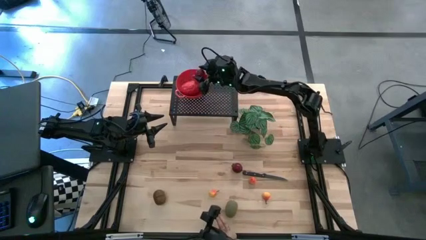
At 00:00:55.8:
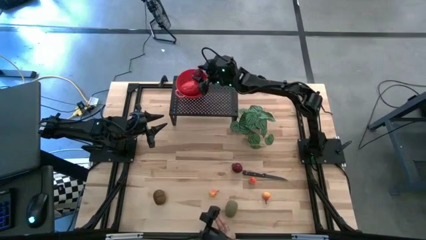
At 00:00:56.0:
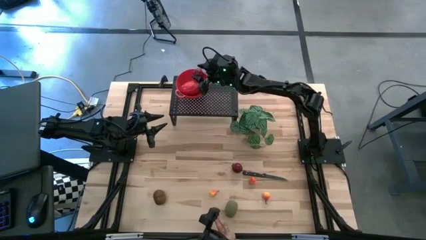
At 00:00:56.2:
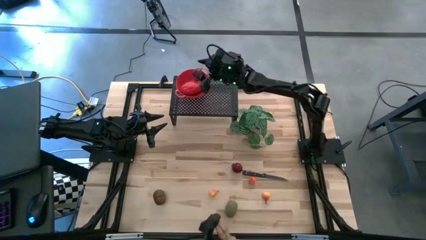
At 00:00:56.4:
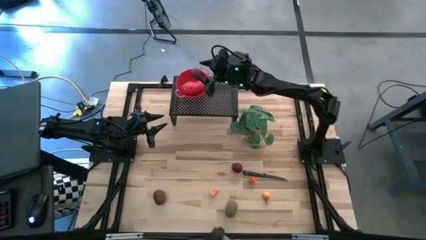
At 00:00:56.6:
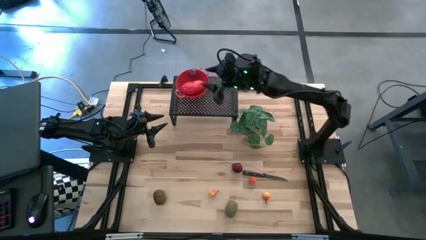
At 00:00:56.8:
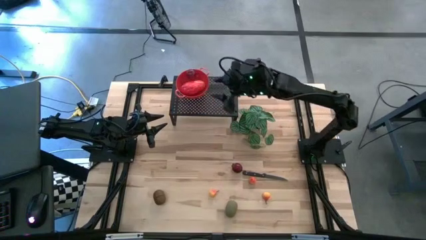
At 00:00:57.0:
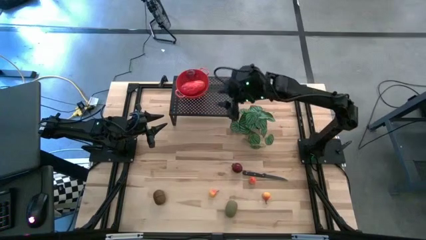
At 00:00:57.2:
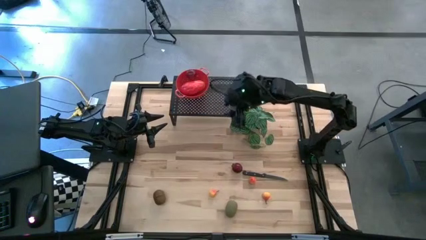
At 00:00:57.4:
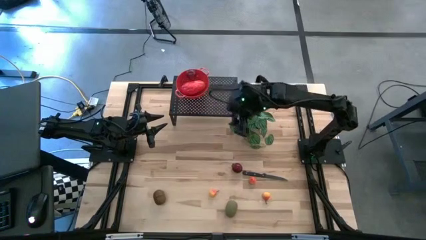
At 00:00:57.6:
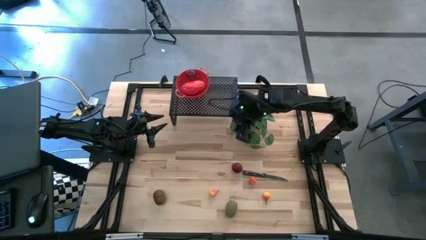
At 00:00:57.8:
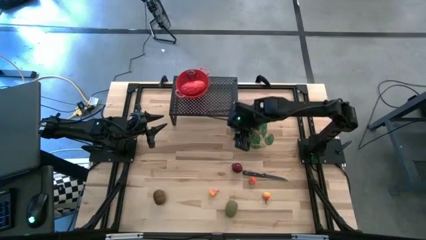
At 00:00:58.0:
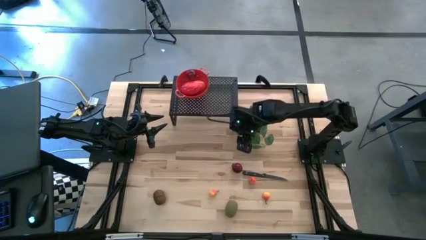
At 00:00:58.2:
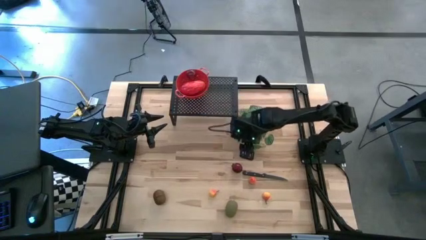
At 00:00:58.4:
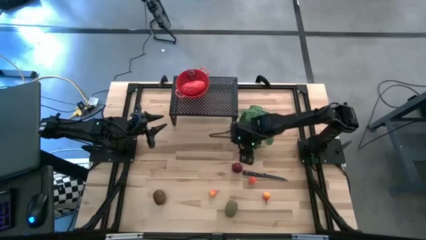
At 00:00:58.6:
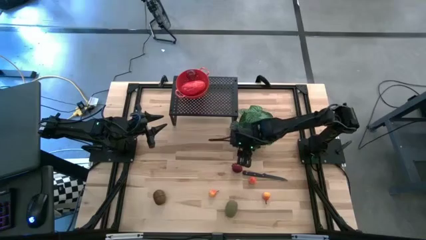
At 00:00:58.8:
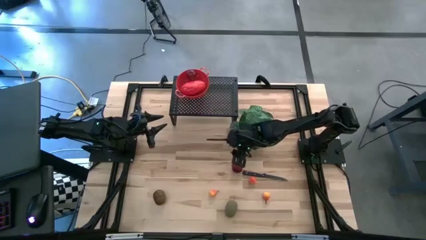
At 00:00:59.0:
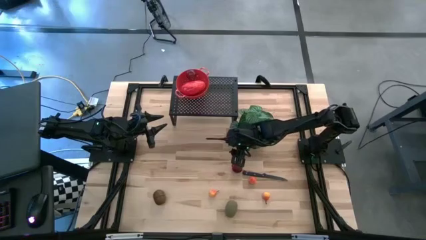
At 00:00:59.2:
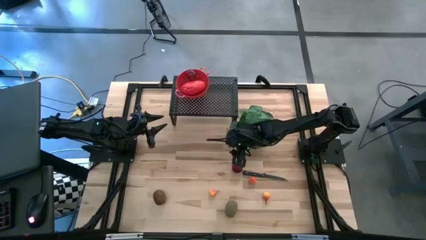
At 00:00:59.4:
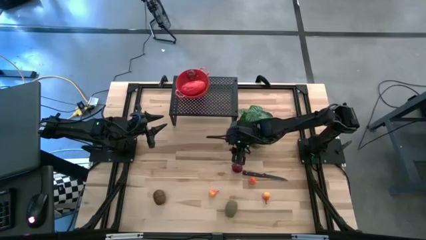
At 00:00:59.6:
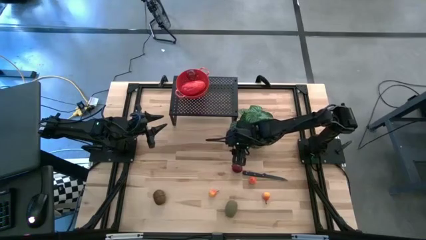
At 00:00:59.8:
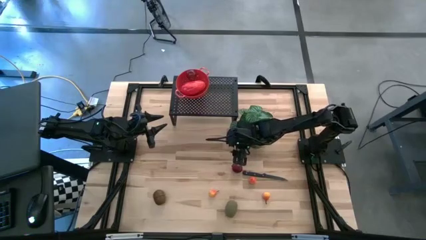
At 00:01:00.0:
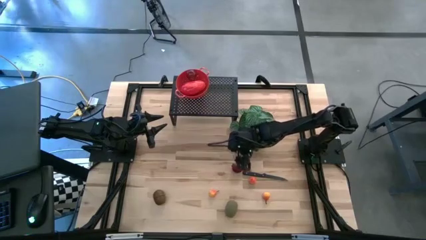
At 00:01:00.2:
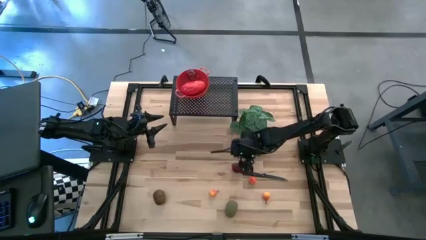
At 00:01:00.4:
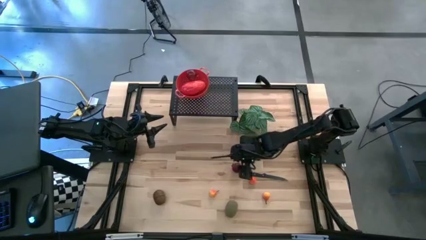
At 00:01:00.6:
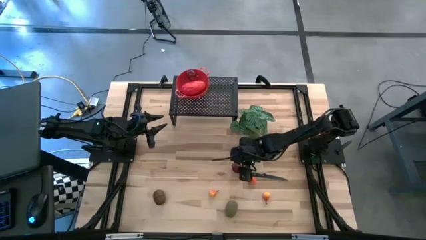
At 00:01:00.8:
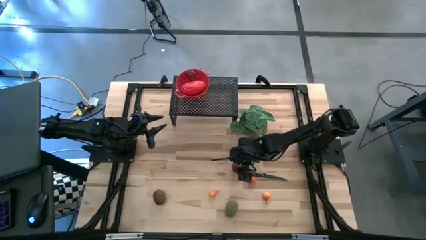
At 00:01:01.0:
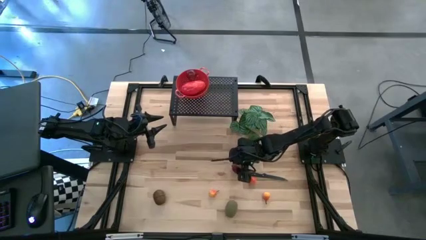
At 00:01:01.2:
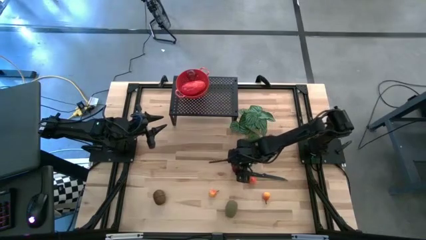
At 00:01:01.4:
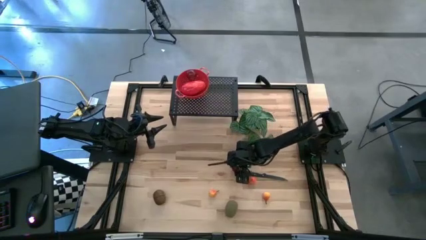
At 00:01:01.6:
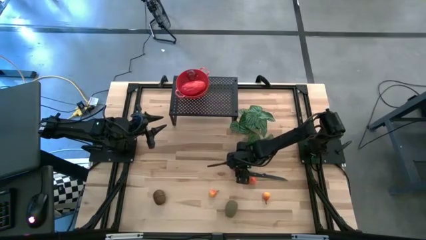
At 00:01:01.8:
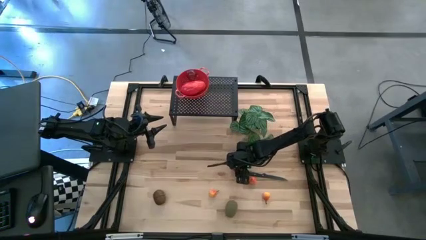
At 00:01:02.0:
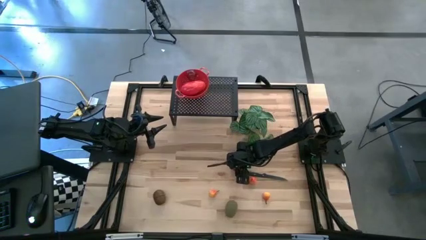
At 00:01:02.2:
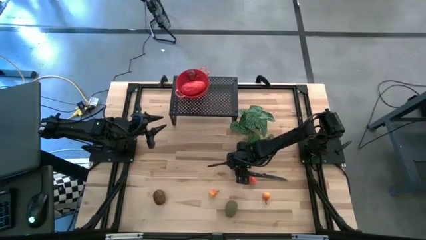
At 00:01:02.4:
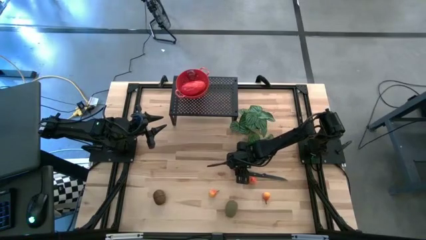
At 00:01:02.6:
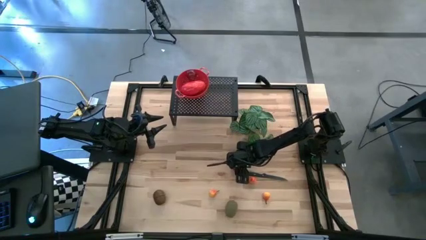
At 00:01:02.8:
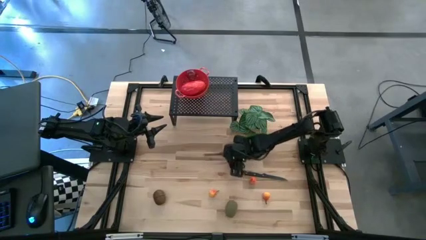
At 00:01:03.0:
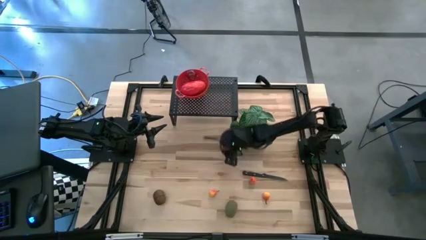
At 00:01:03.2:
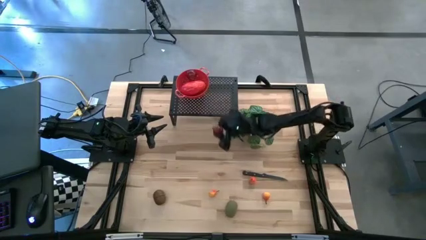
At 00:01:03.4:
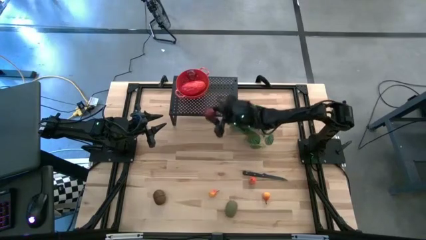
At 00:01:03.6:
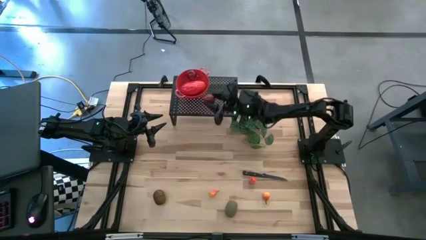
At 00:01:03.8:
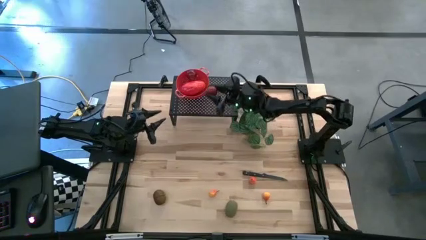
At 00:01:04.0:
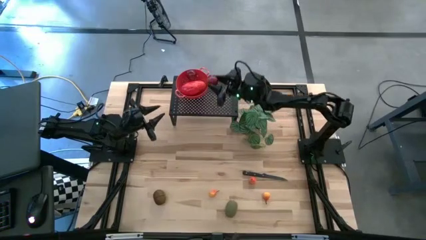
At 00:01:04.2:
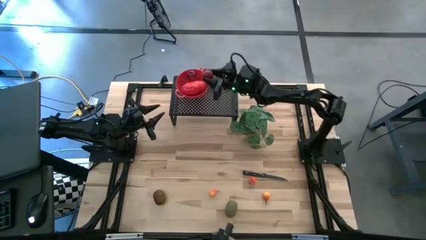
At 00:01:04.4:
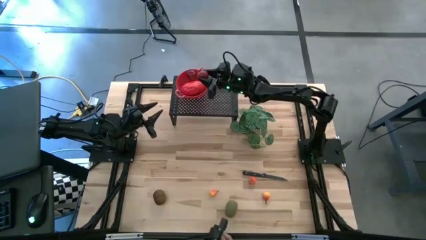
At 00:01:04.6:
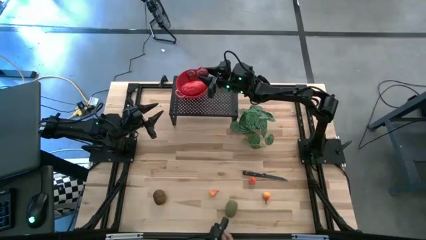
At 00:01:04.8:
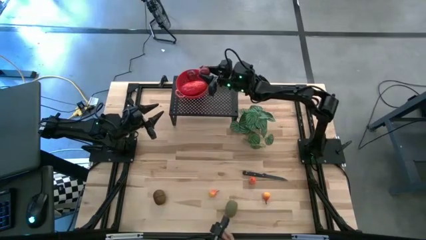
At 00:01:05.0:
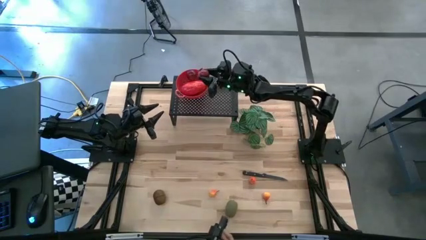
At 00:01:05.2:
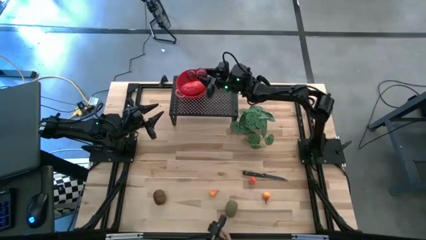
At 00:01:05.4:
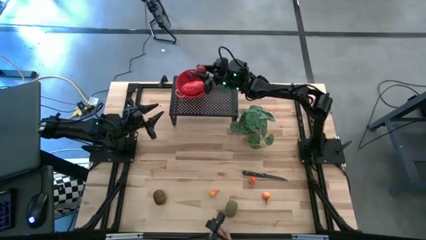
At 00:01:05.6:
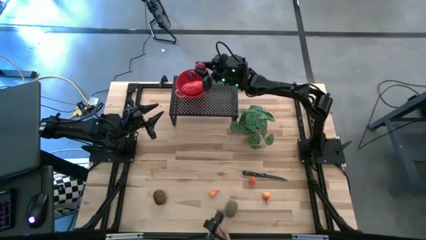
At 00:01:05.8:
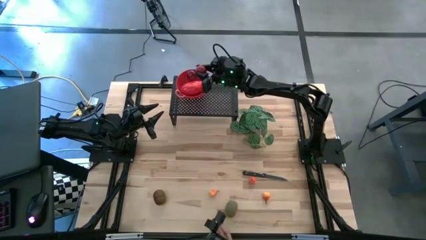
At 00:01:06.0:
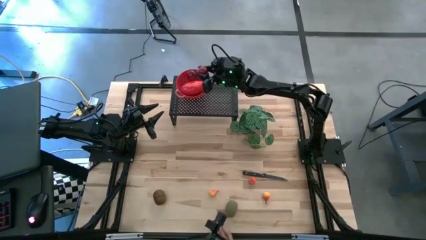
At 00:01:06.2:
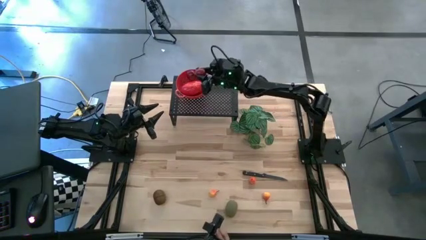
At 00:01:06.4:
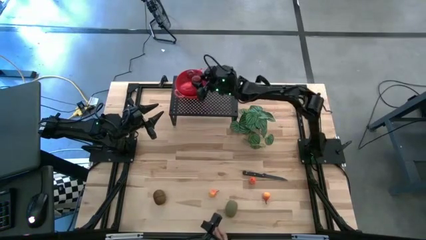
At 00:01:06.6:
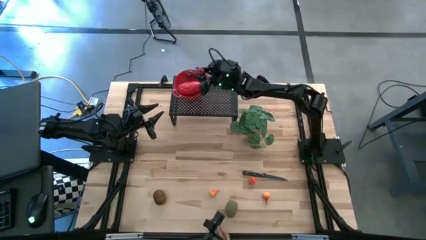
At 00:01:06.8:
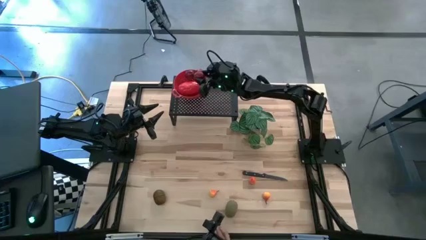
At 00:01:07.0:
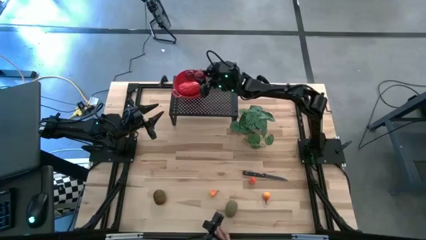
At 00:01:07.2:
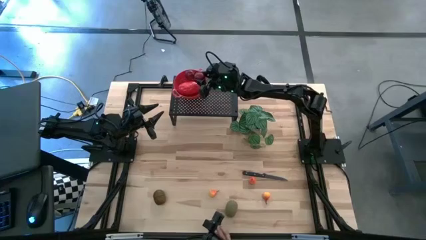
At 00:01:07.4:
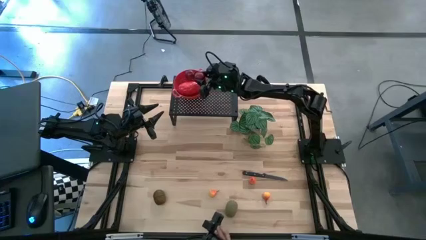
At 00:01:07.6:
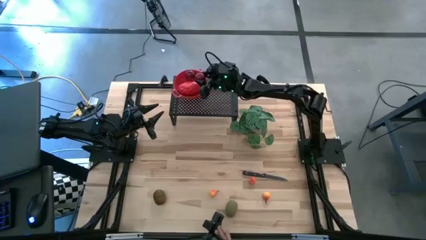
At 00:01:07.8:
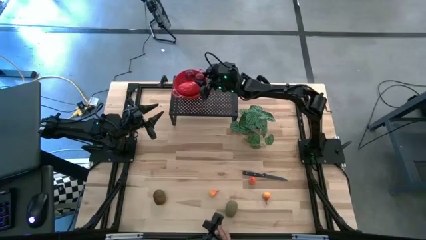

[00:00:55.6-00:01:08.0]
Task: Pick & Place Fruit
Put the red pomegranate in the red strainer bowl on the shelf
